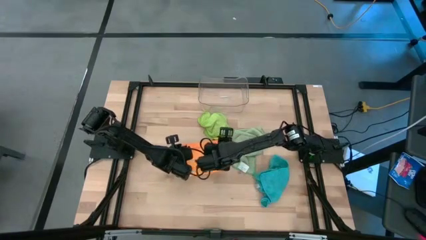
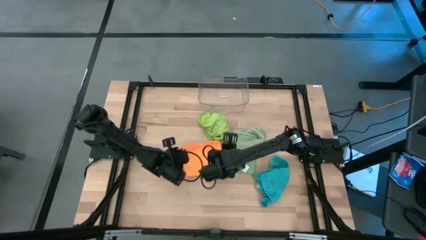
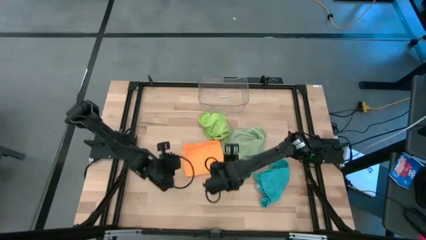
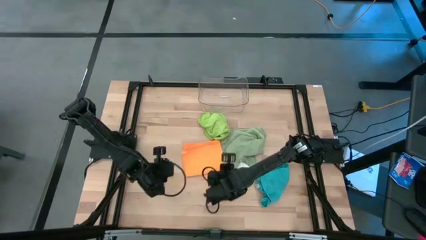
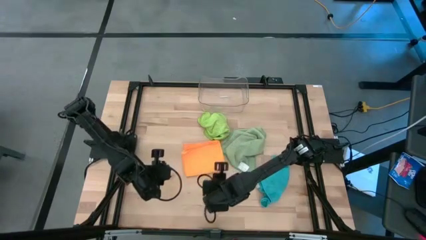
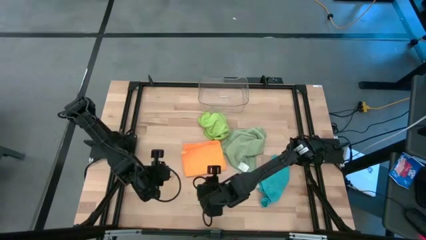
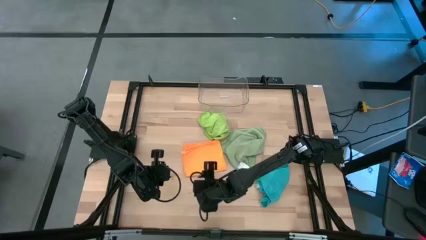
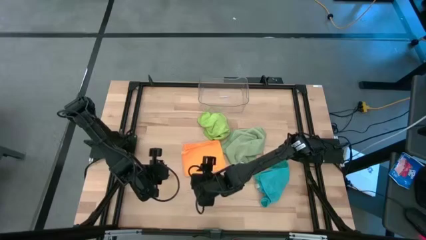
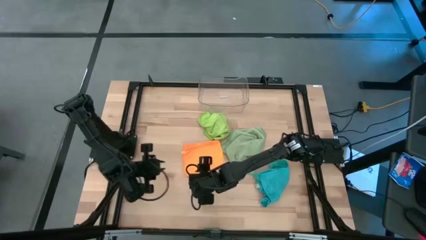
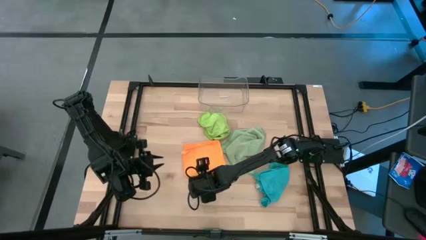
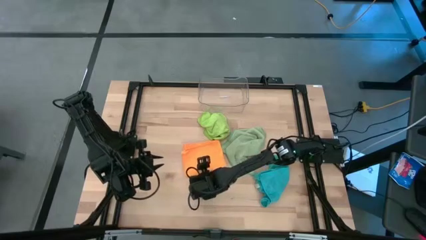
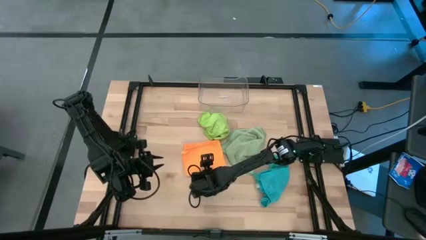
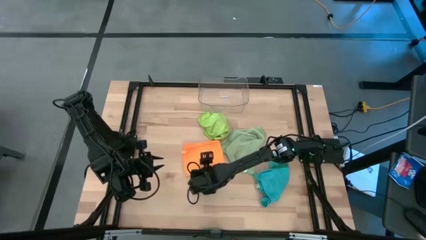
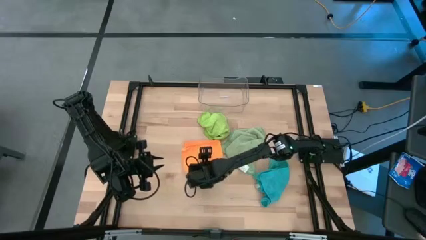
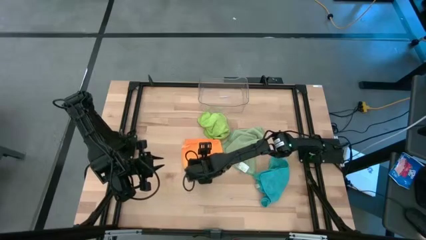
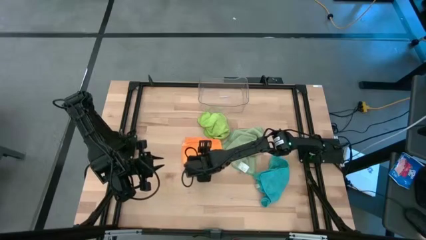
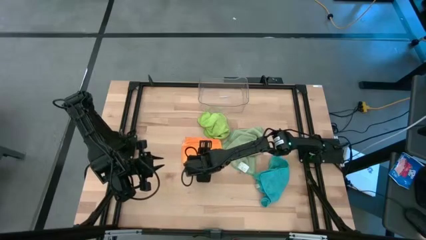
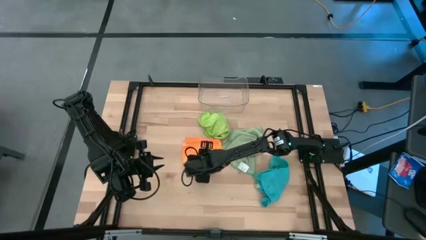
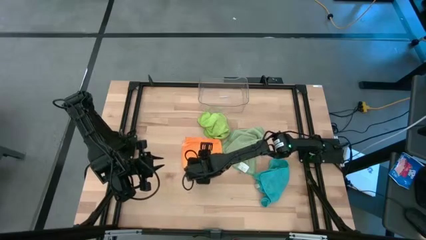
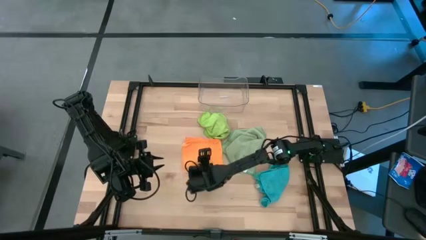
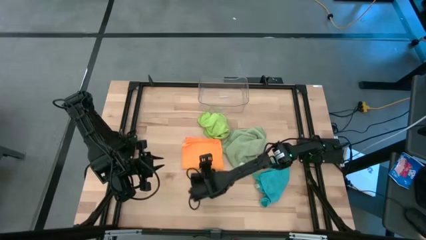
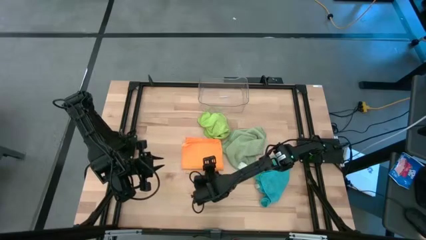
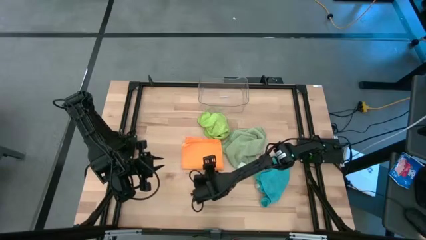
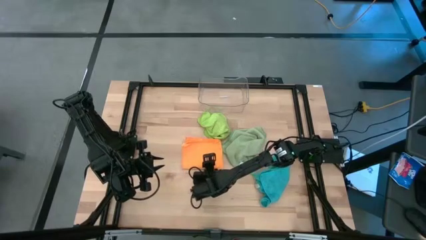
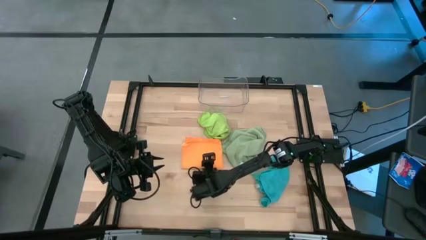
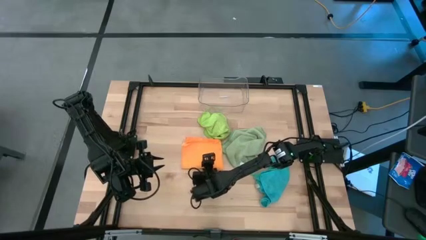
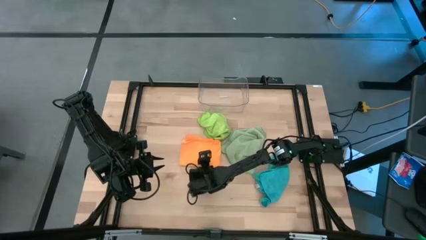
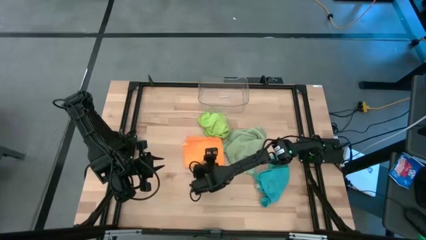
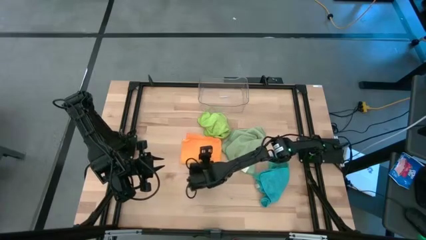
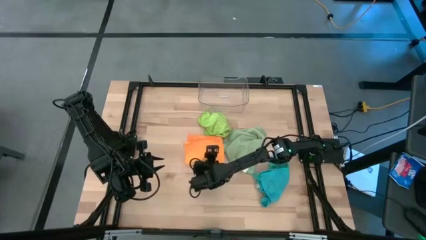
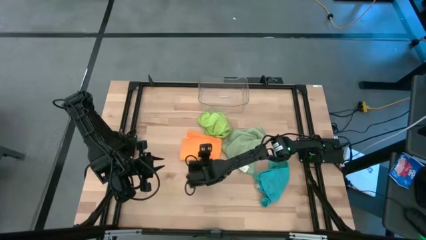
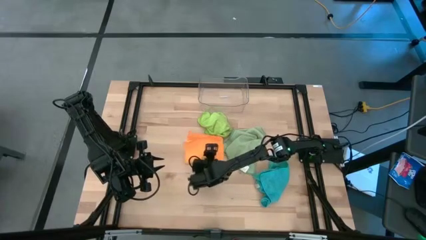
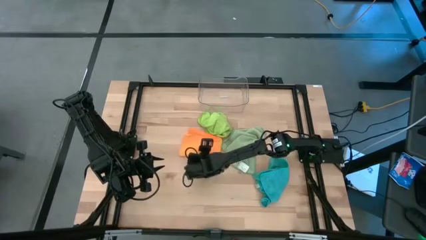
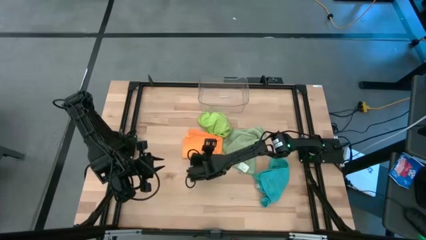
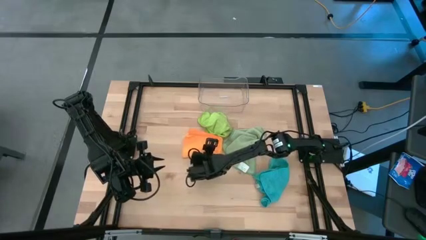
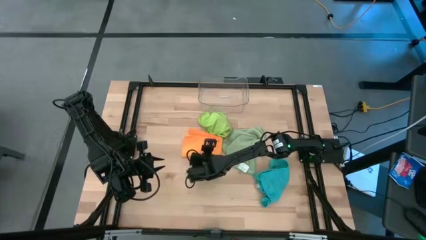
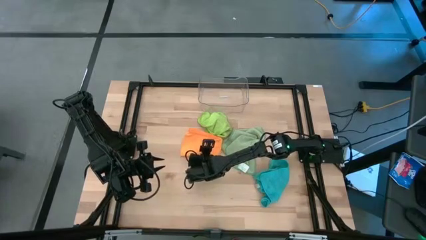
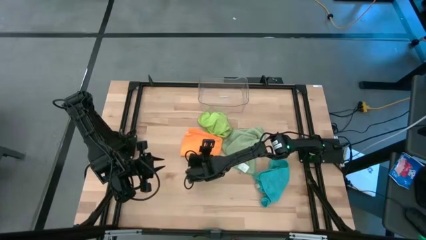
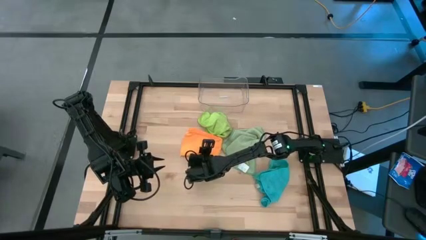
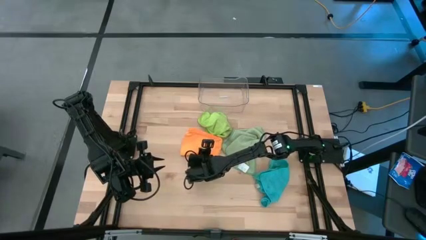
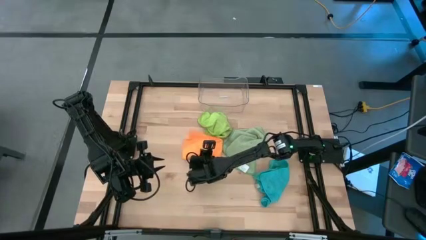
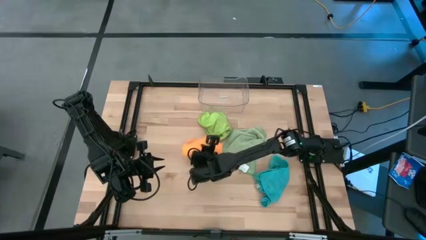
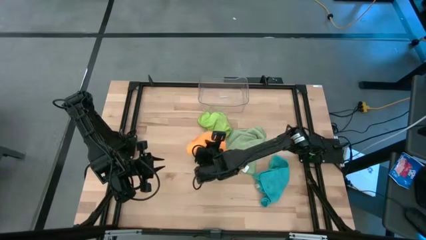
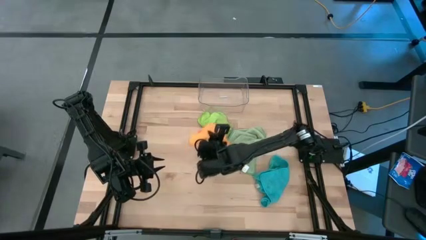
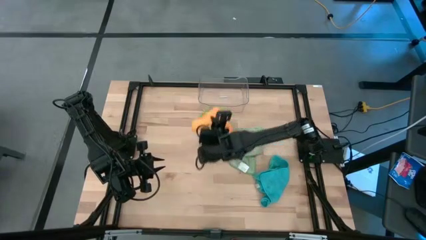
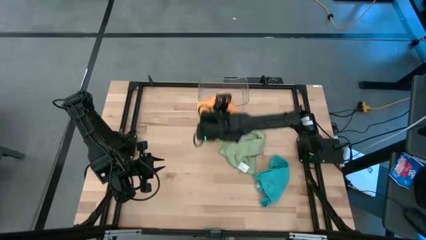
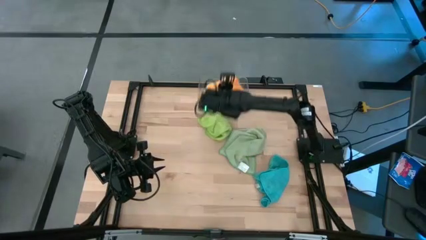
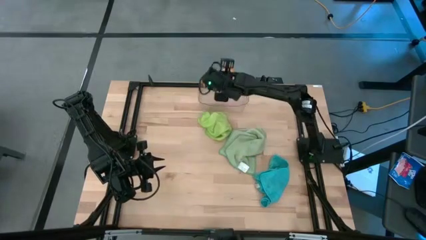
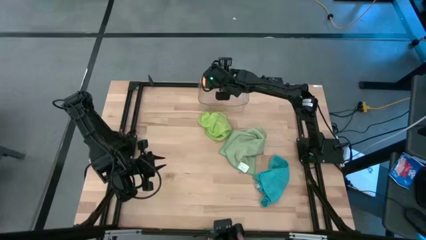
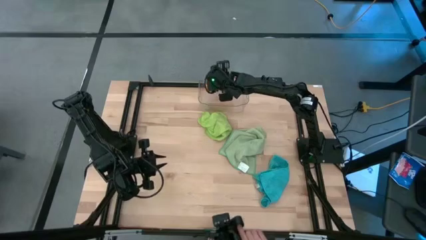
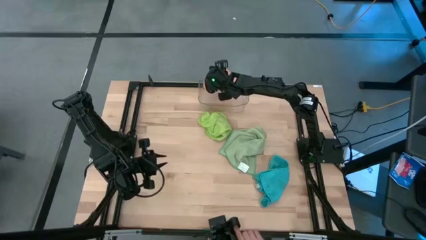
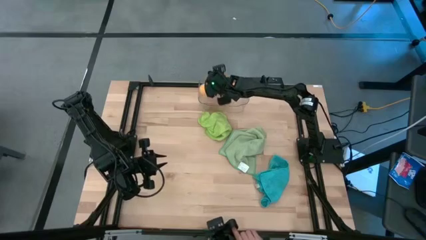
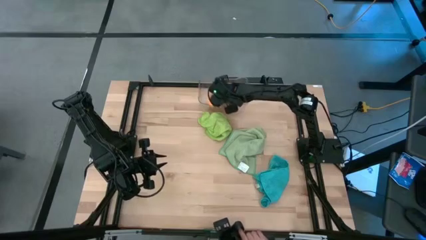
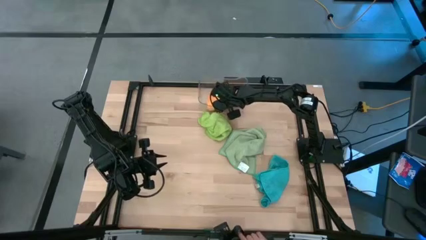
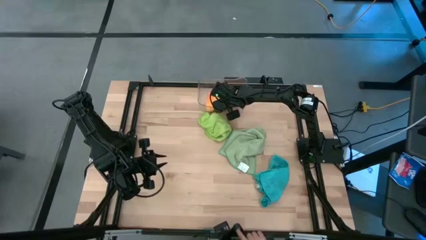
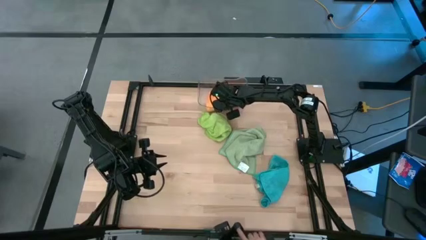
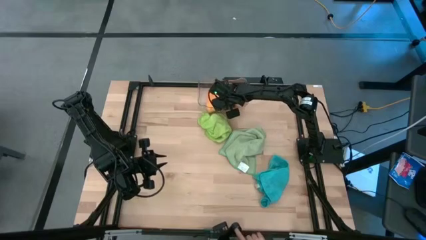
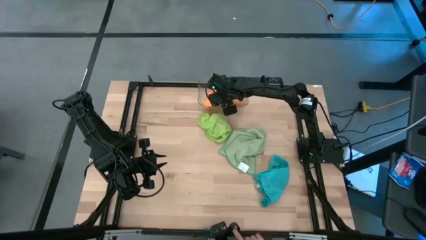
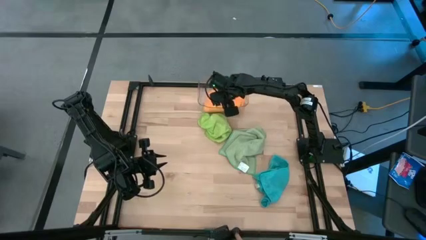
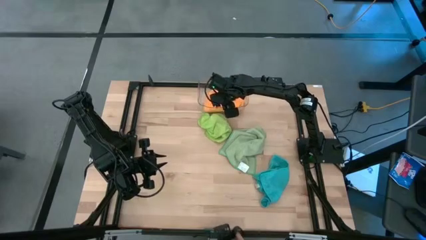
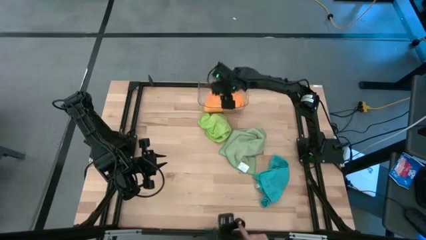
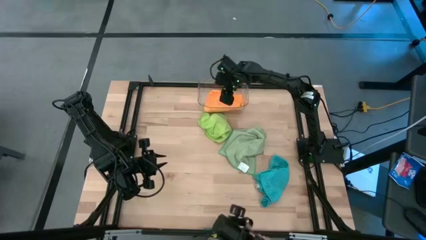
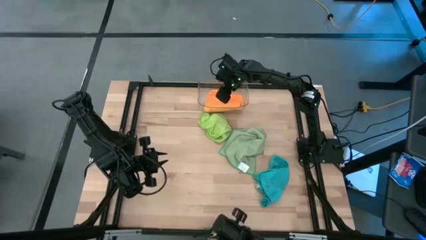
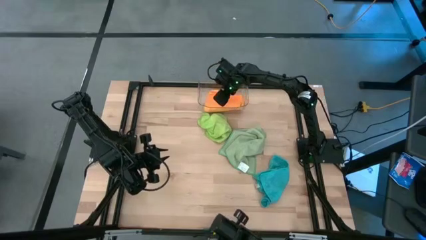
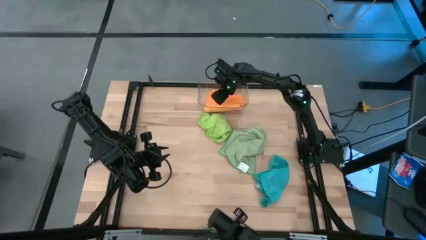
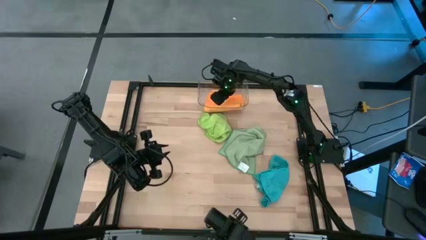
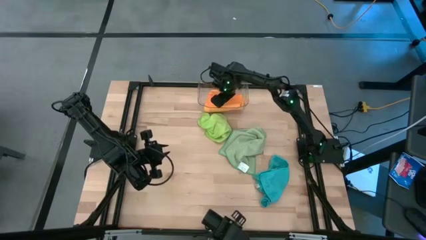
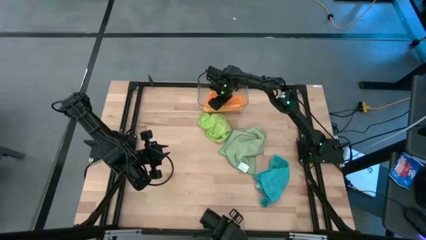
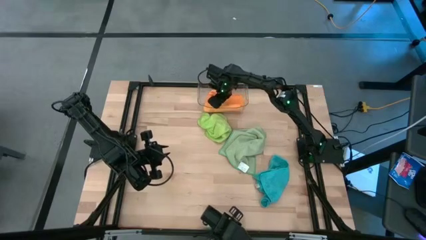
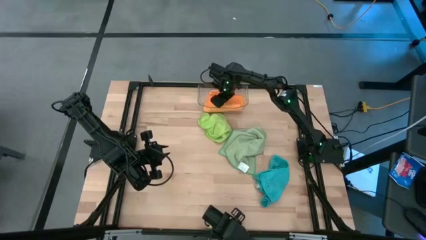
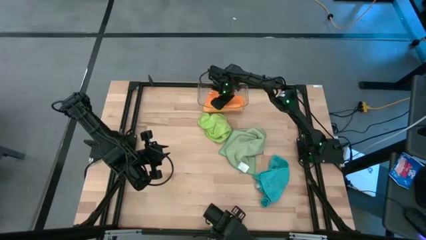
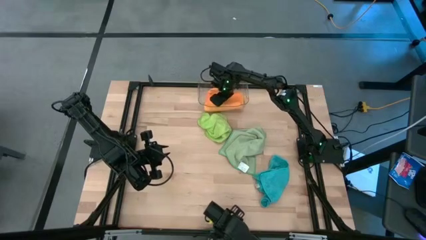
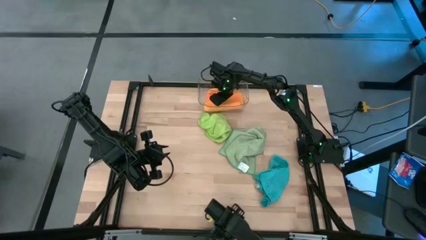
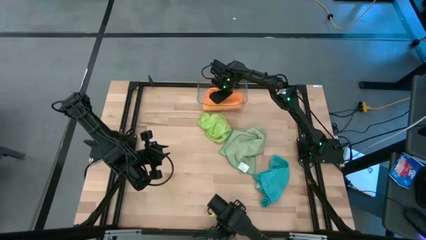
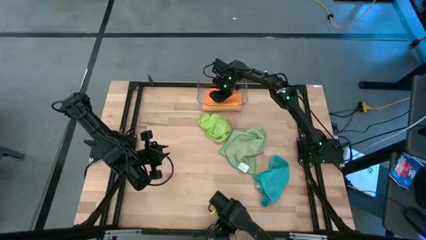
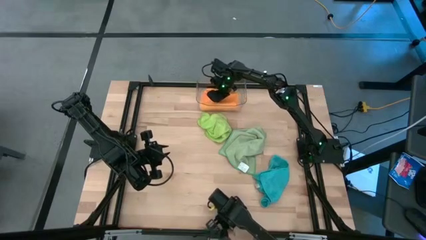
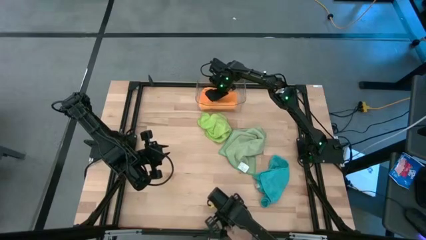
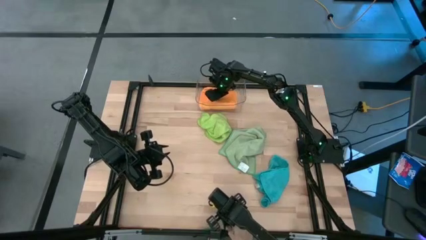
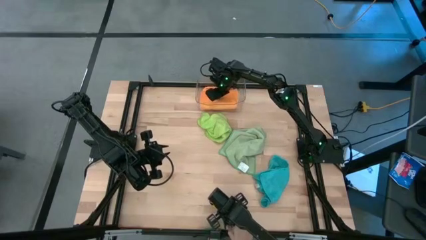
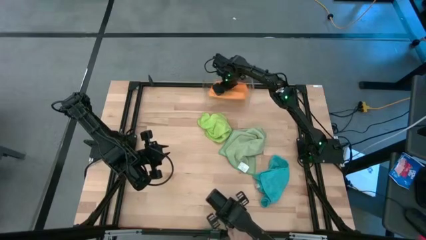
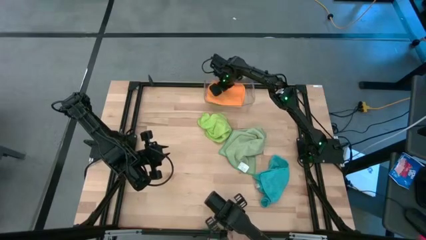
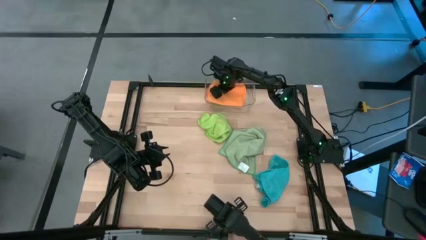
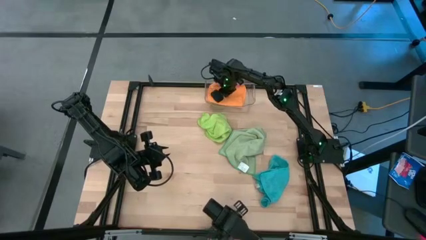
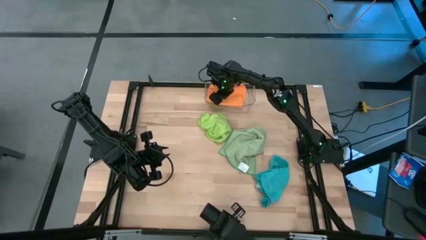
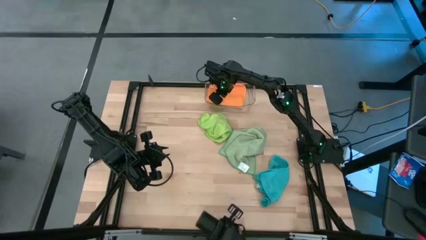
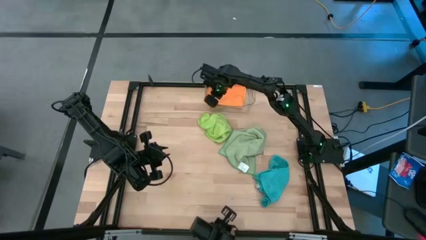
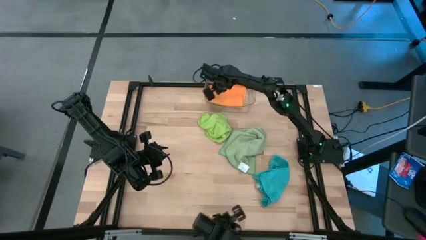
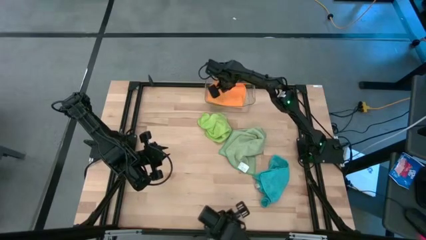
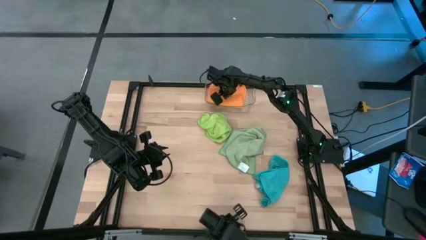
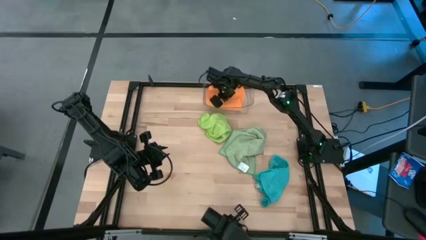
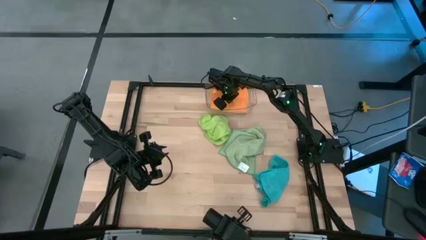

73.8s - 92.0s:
Task: Fold microfiber towels
Put the orange microfiber towel into the transparent bin
